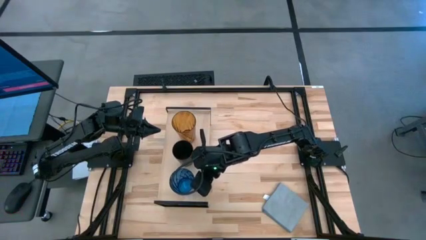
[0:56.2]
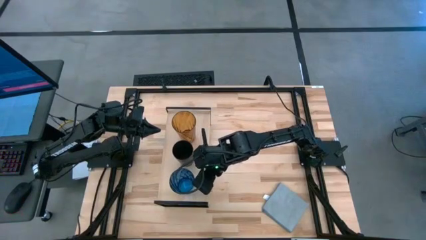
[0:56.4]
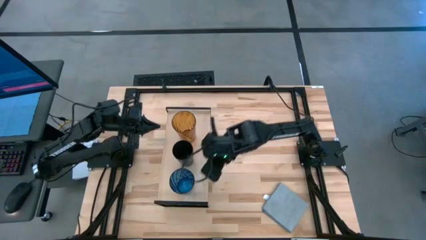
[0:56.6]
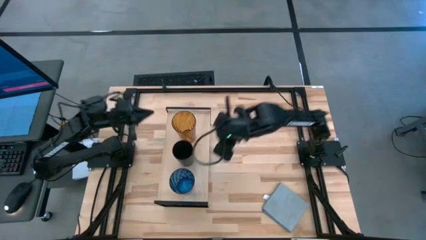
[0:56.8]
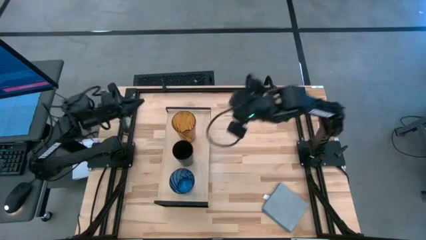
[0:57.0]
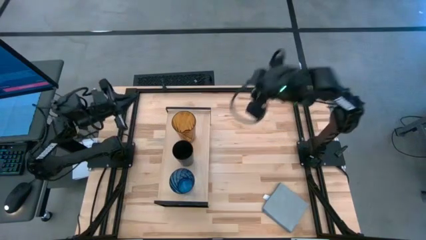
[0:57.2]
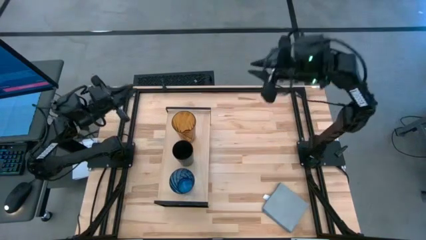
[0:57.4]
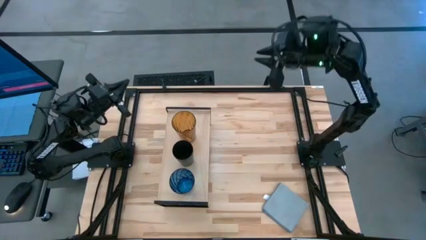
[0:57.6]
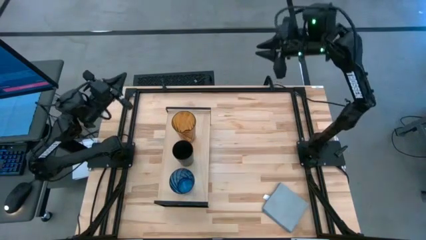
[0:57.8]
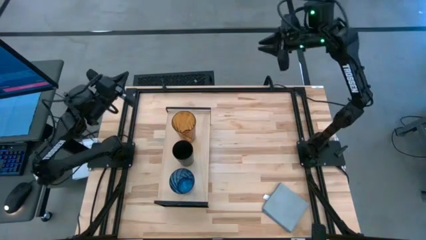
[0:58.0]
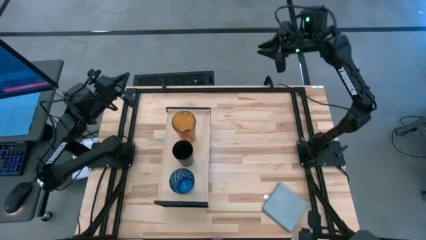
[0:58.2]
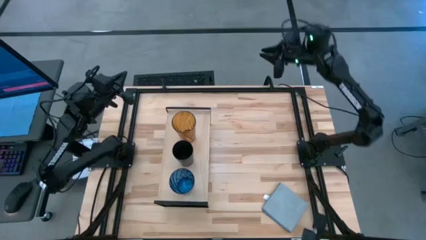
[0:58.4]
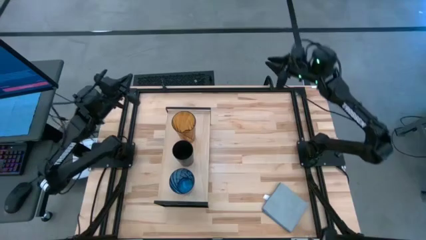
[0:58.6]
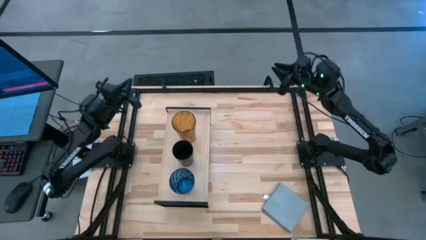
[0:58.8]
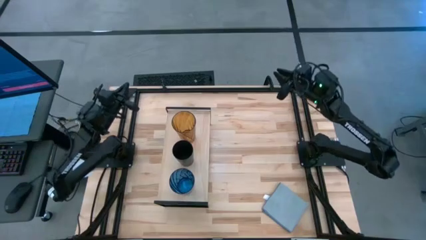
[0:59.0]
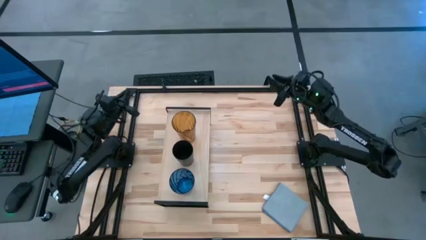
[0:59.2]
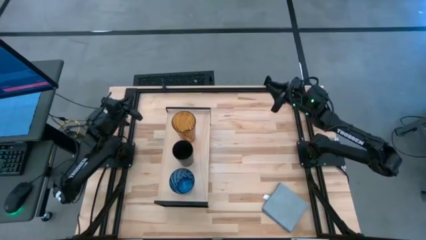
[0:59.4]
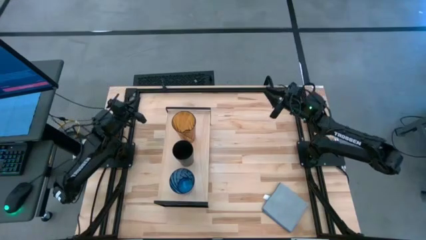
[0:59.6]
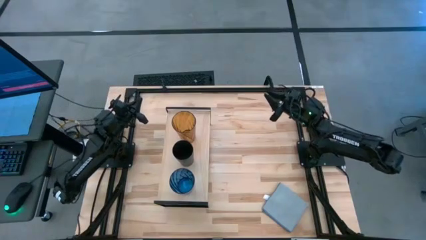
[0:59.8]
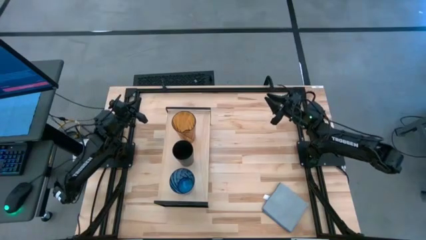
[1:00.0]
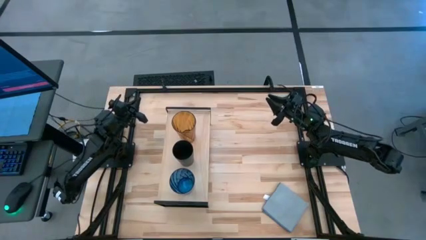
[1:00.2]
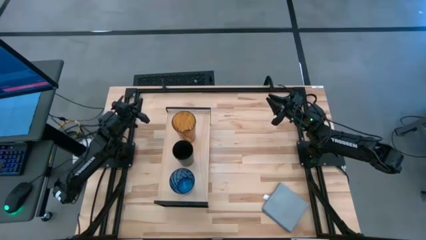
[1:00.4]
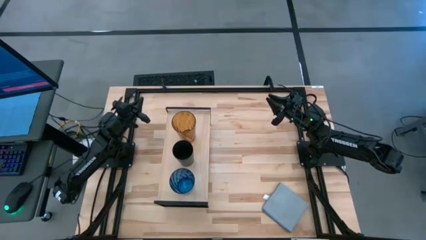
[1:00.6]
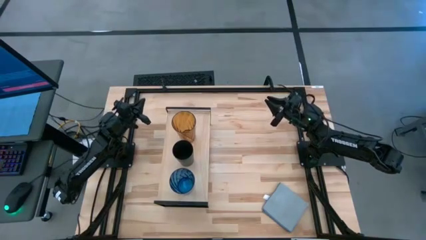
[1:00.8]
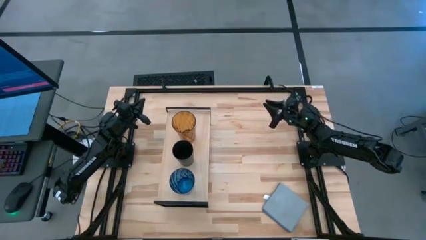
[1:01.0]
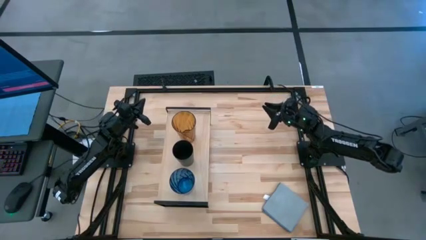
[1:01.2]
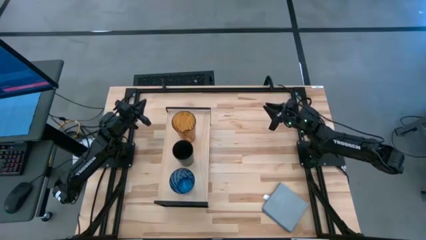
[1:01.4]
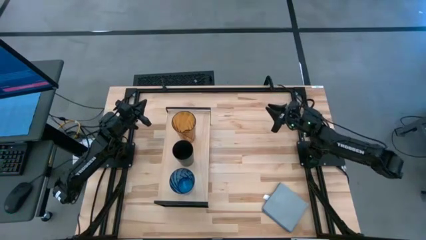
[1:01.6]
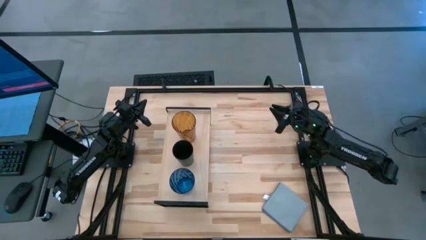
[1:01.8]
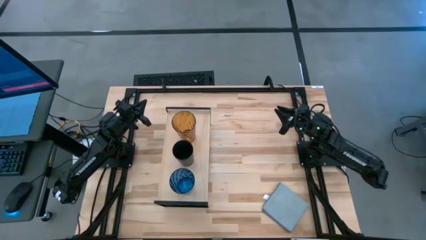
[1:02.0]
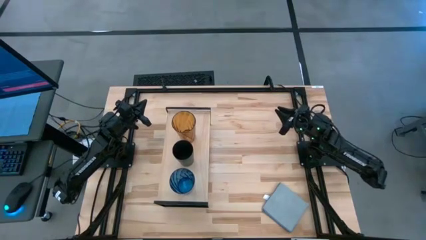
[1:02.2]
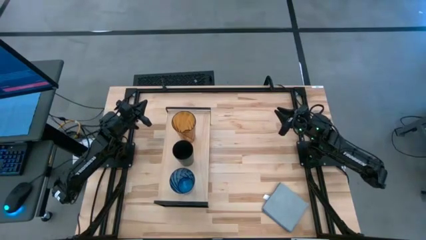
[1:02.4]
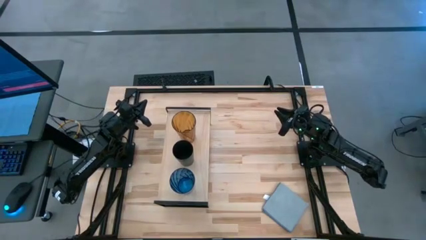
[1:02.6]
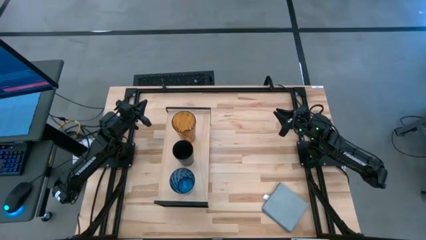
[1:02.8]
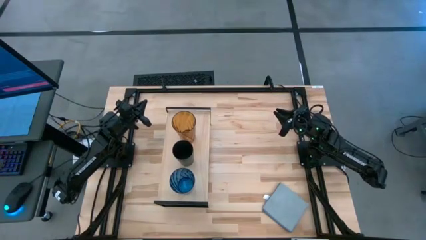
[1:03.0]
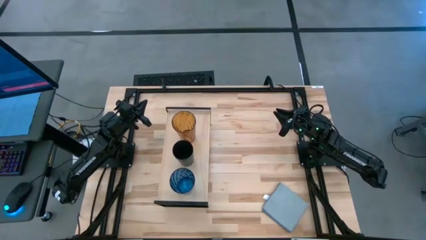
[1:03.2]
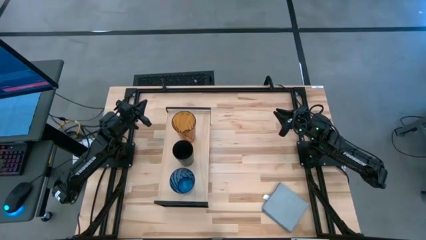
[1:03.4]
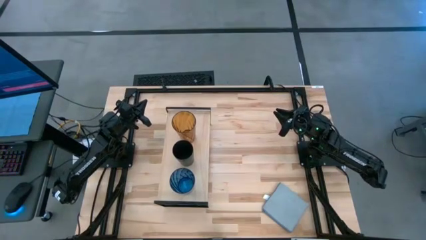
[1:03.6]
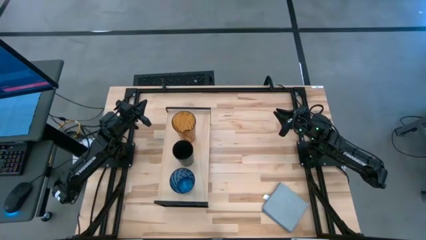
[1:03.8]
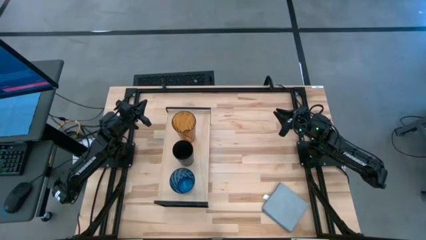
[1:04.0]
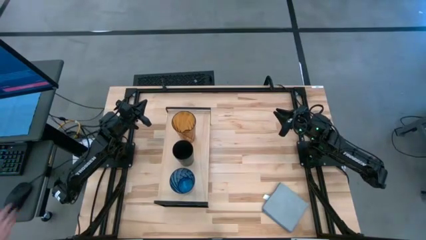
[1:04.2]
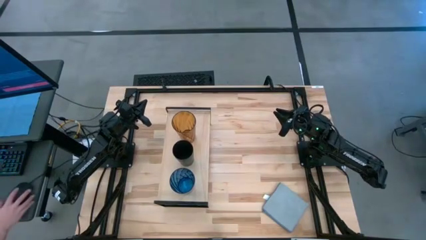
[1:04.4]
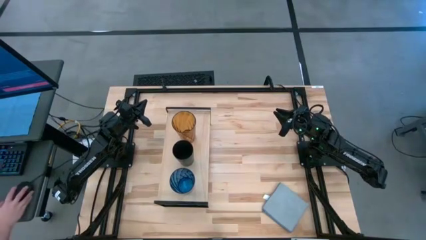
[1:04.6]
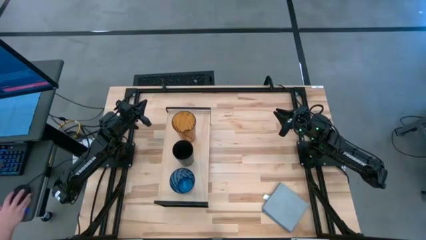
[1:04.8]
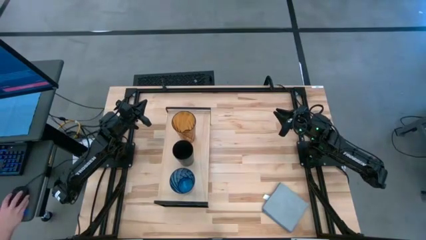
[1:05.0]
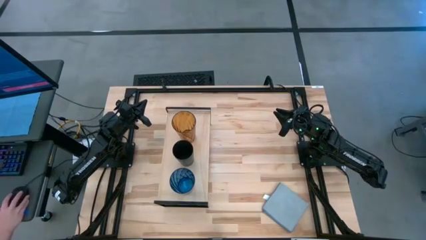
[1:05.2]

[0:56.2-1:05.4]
Task: Stack small to large cups/mugs on shelf
Return to Home Position

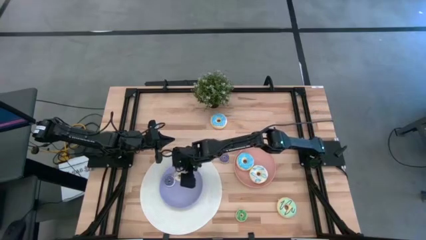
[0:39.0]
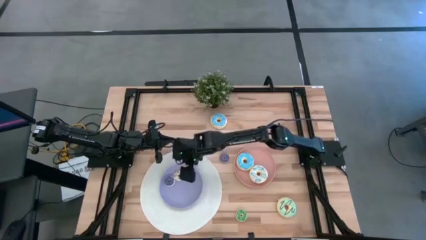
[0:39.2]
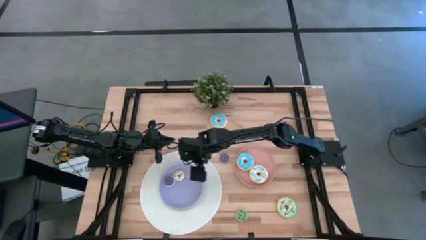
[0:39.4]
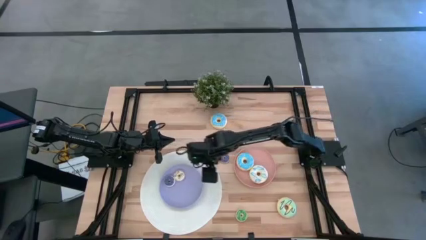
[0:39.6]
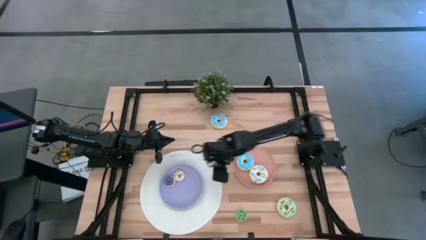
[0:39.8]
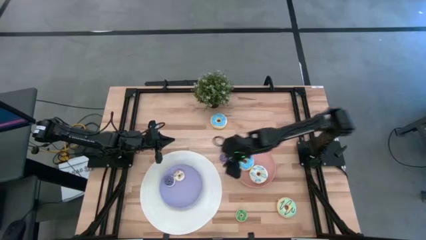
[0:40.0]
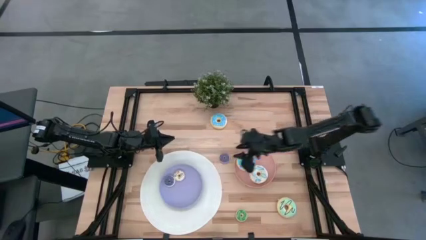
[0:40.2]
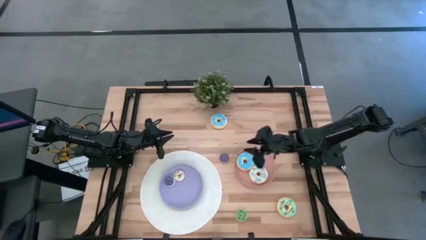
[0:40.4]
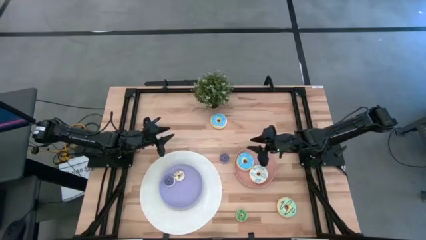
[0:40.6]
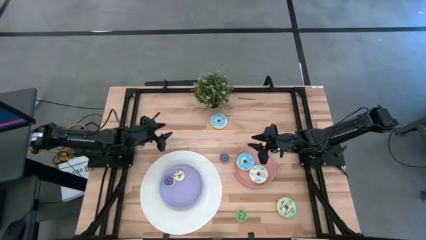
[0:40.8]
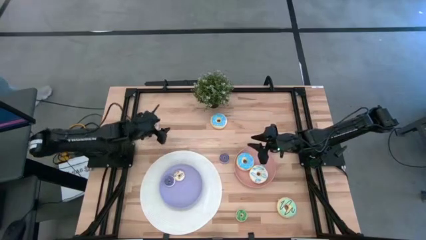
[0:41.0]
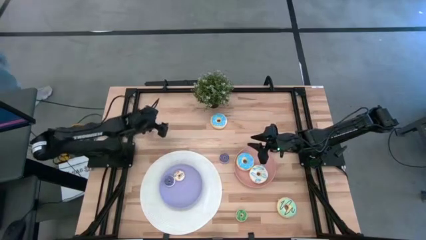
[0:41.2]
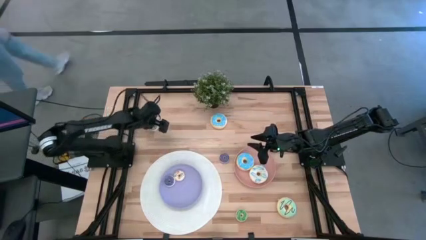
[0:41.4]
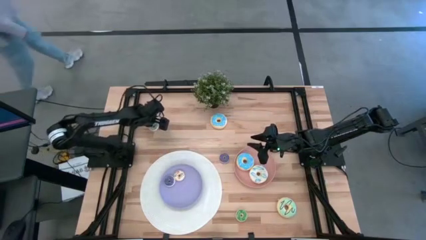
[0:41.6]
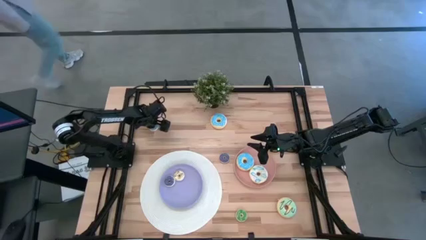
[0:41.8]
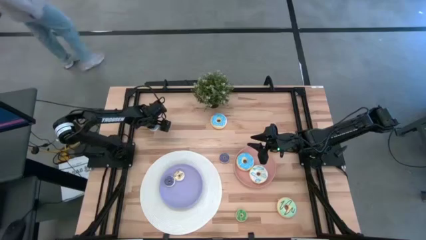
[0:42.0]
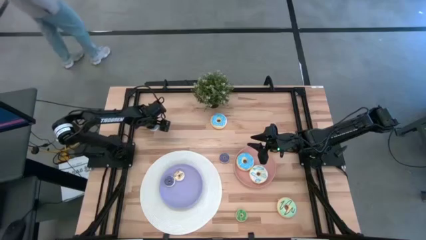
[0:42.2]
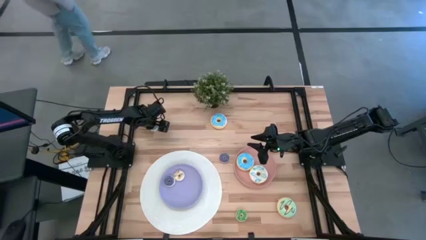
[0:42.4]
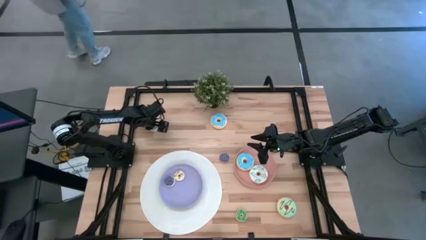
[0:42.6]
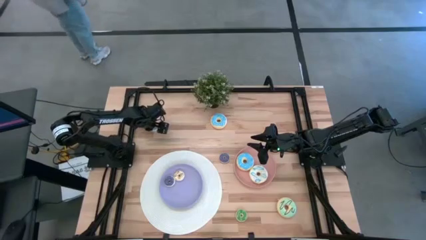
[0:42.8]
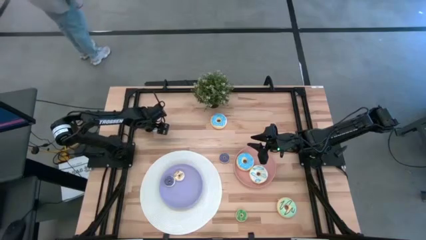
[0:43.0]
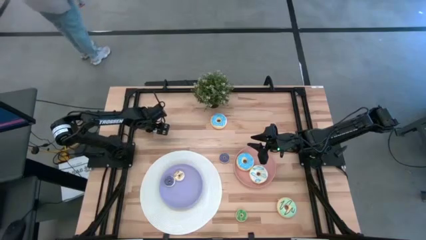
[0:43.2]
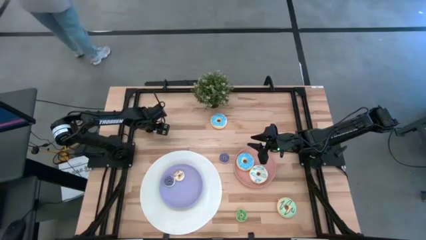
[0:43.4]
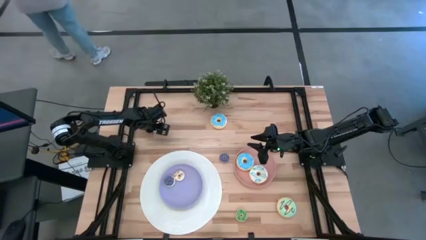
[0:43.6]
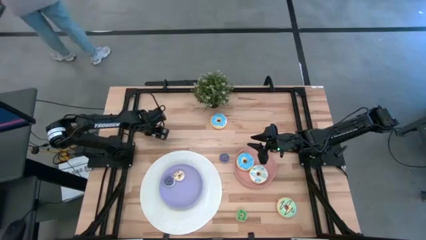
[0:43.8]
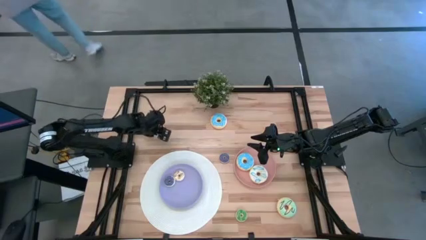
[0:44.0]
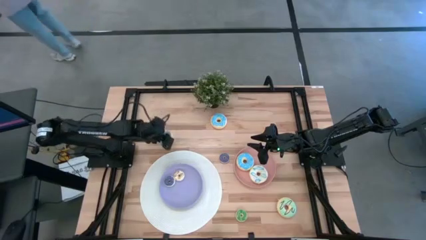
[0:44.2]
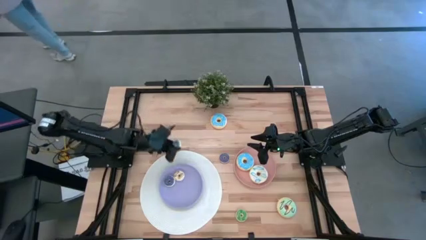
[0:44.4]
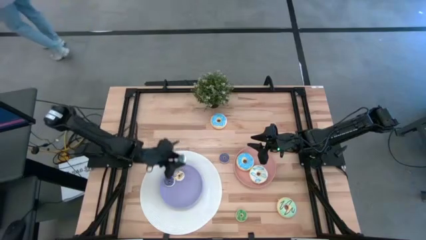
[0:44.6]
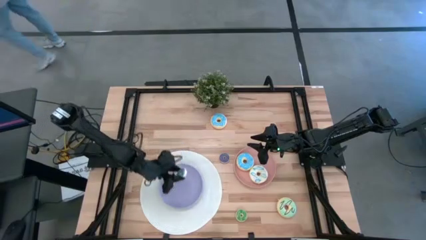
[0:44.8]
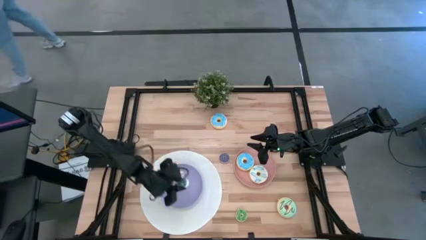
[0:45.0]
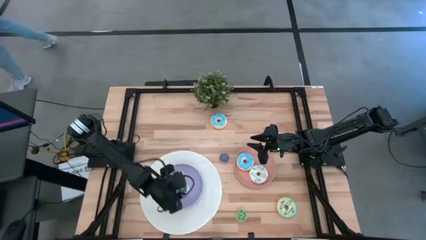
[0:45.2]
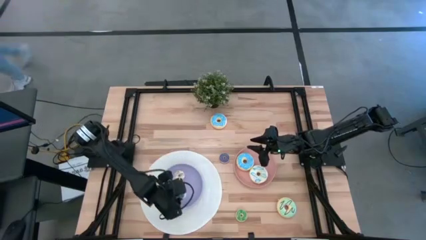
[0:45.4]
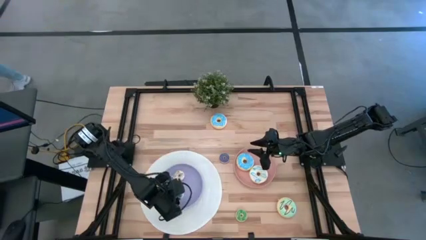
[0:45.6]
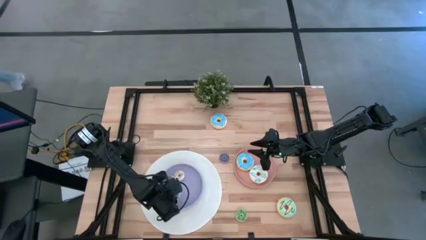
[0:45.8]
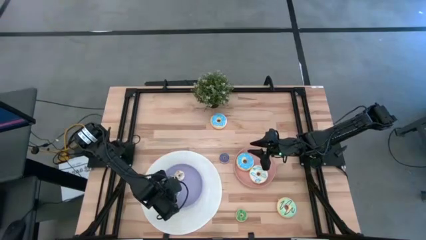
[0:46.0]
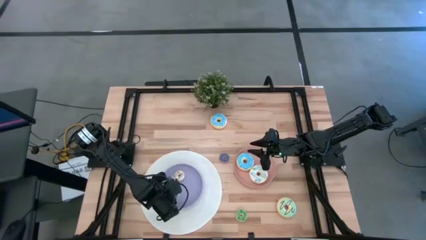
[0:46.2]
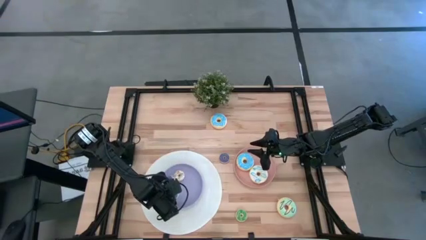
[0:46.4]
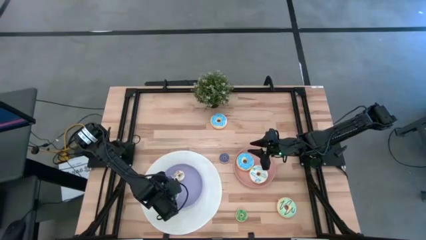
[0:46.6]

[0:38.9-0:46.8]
Task: Pick & Place donuts
Put the small blue donut on the violet plate
